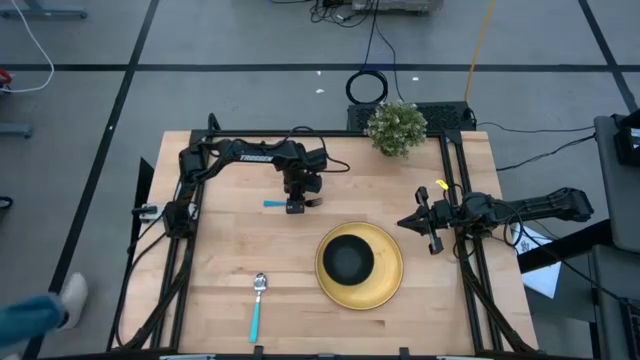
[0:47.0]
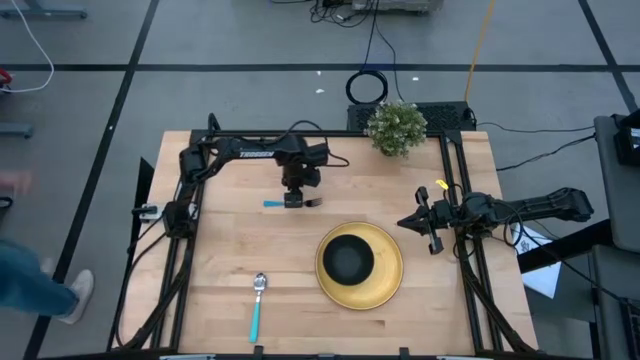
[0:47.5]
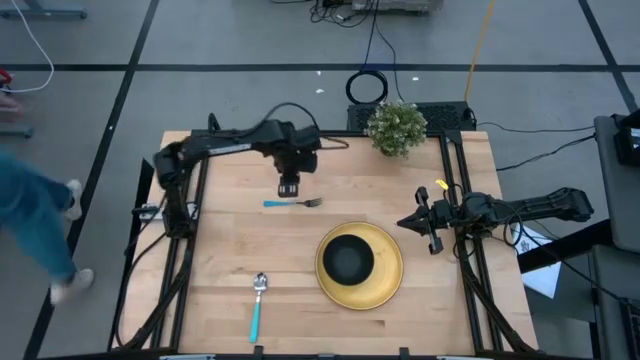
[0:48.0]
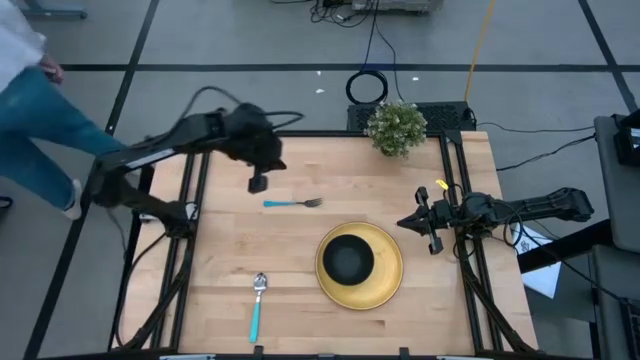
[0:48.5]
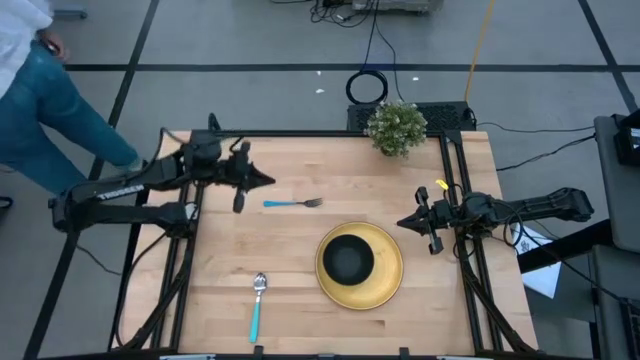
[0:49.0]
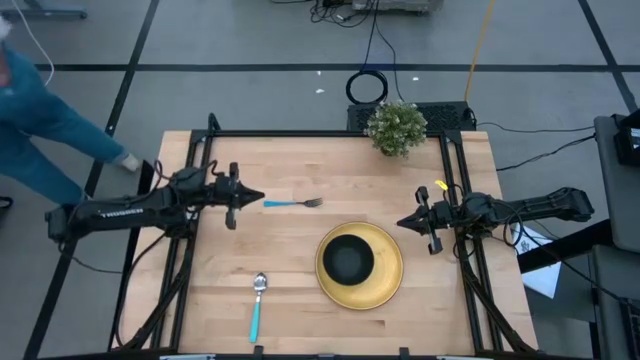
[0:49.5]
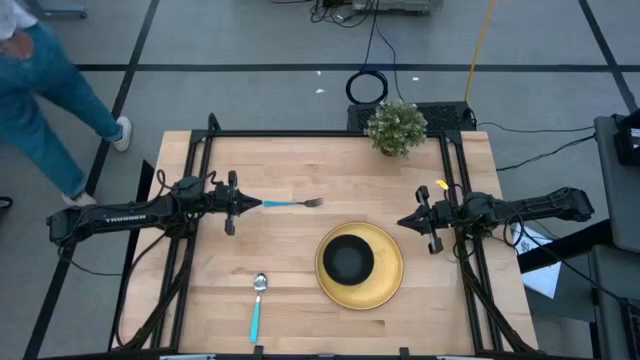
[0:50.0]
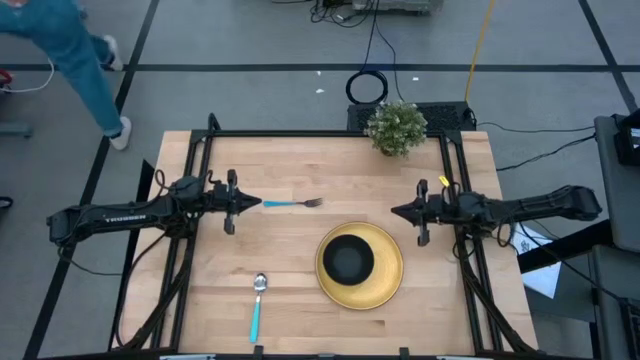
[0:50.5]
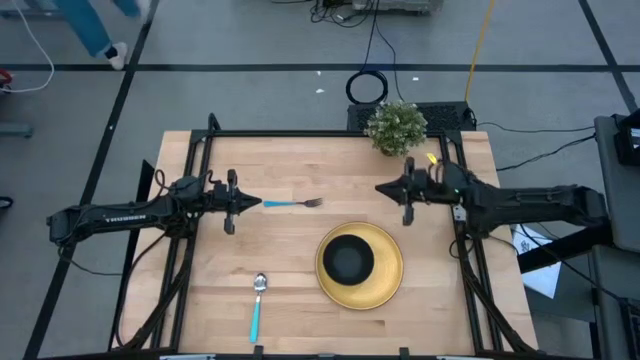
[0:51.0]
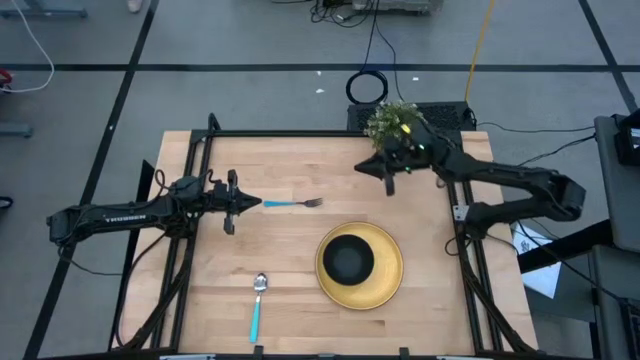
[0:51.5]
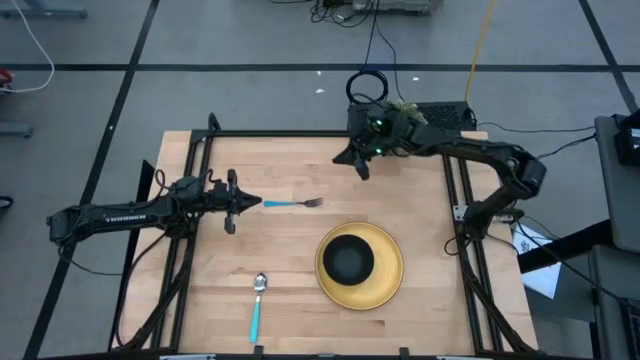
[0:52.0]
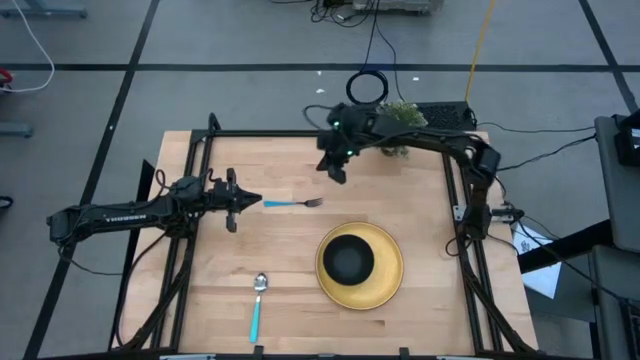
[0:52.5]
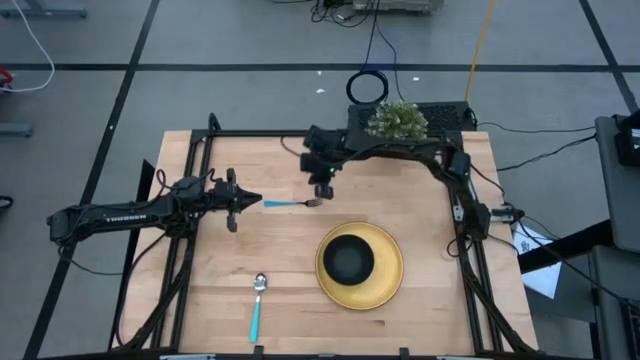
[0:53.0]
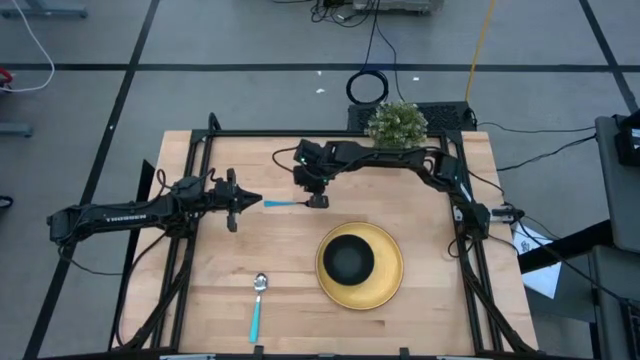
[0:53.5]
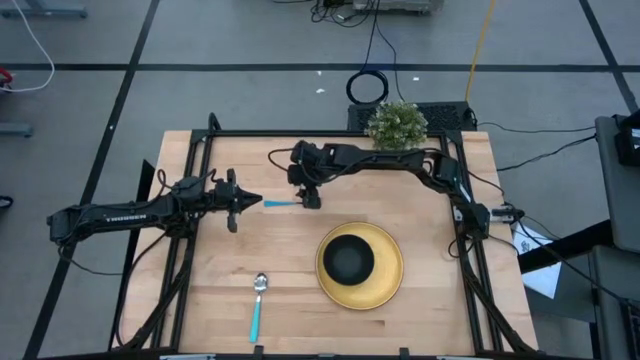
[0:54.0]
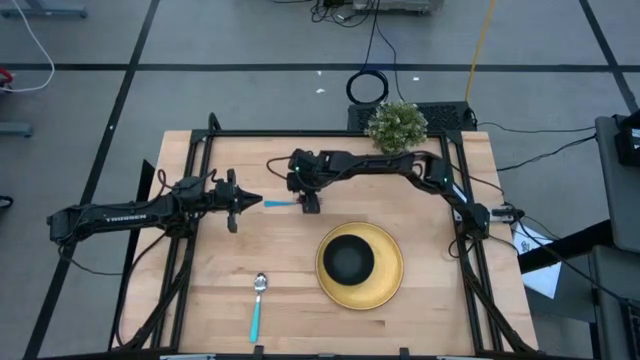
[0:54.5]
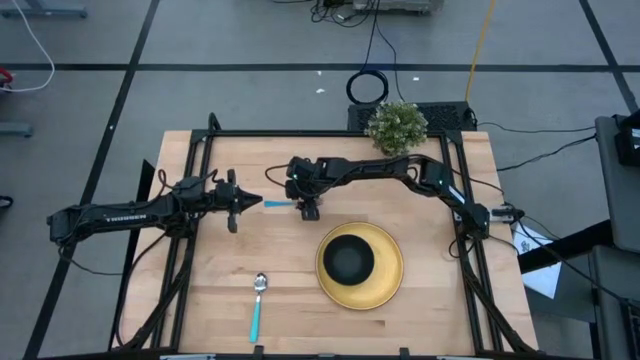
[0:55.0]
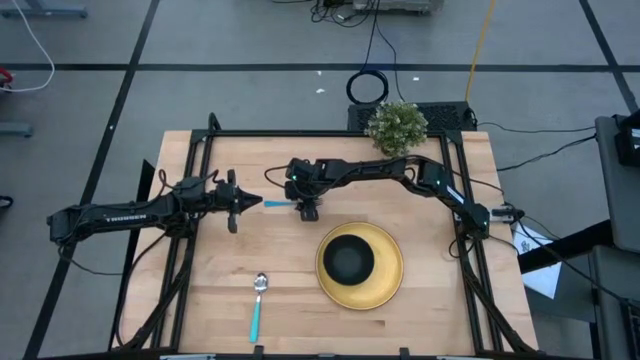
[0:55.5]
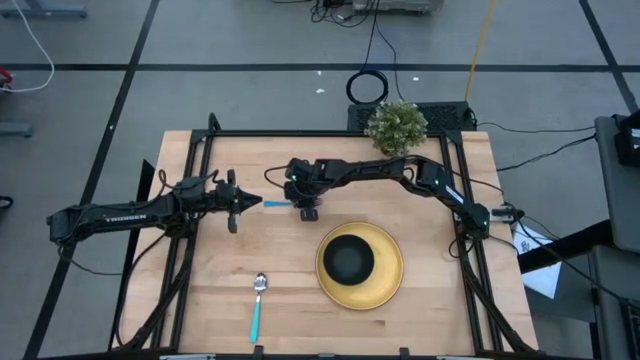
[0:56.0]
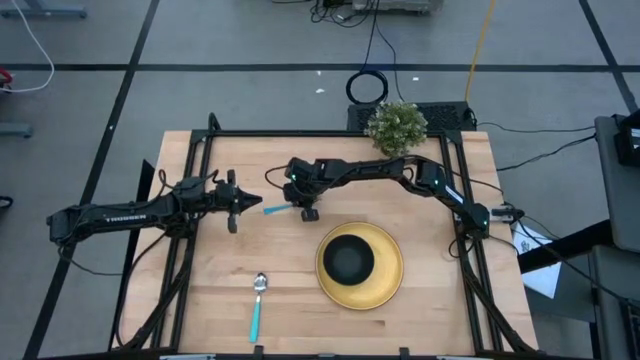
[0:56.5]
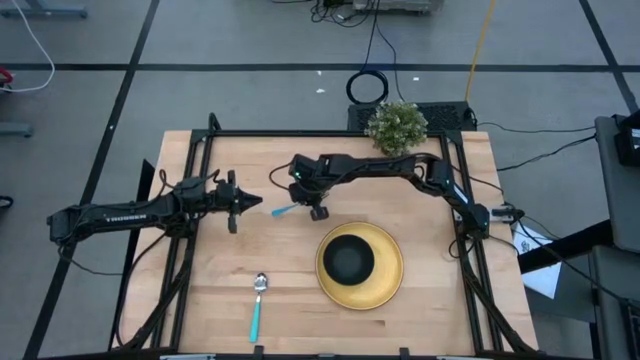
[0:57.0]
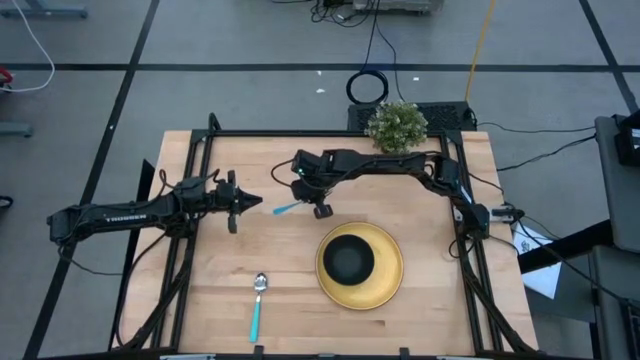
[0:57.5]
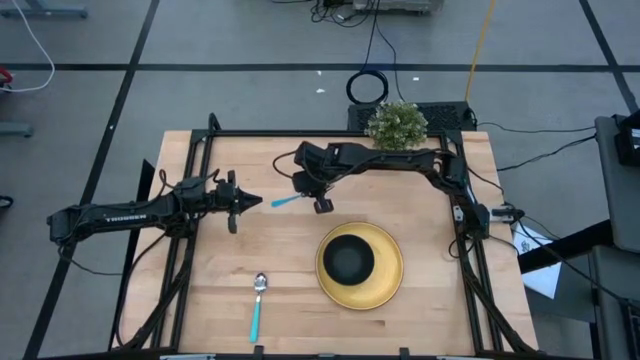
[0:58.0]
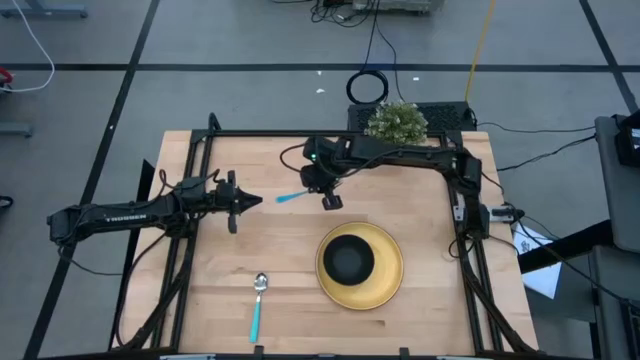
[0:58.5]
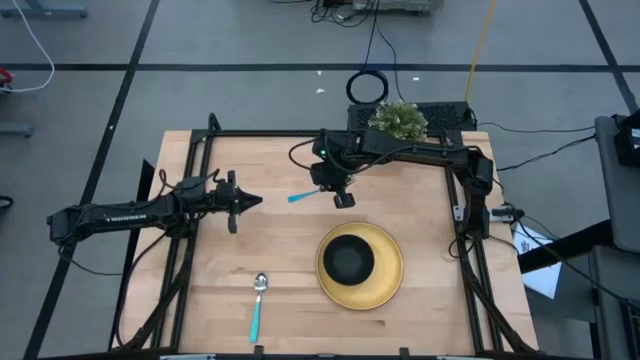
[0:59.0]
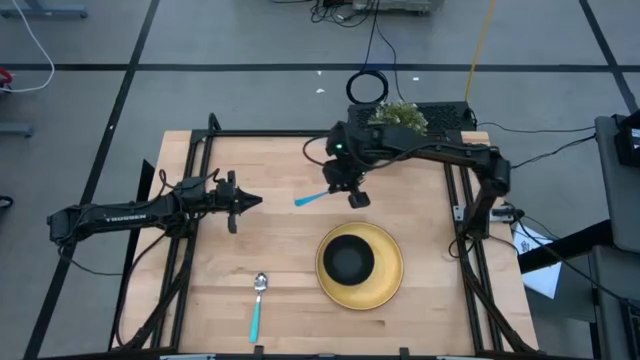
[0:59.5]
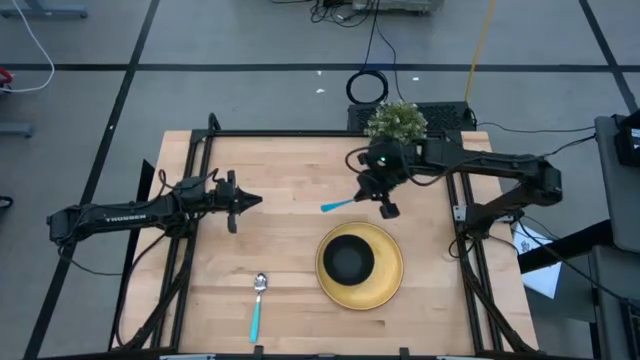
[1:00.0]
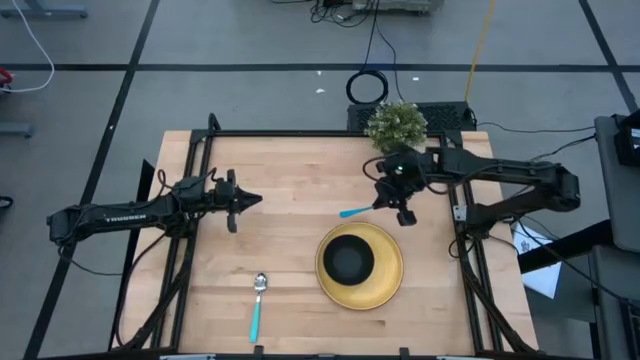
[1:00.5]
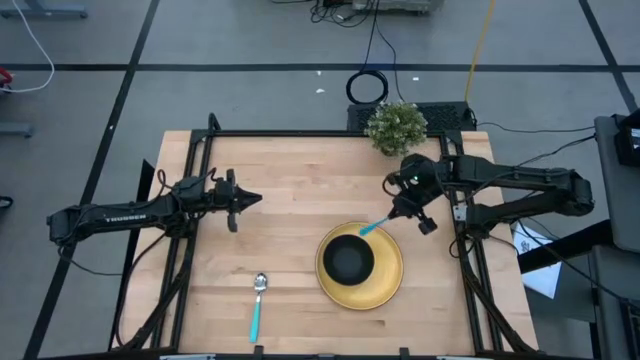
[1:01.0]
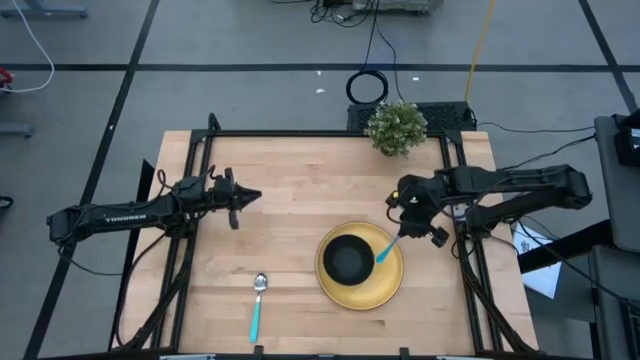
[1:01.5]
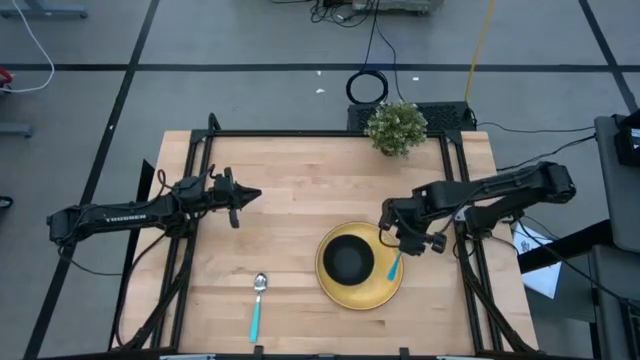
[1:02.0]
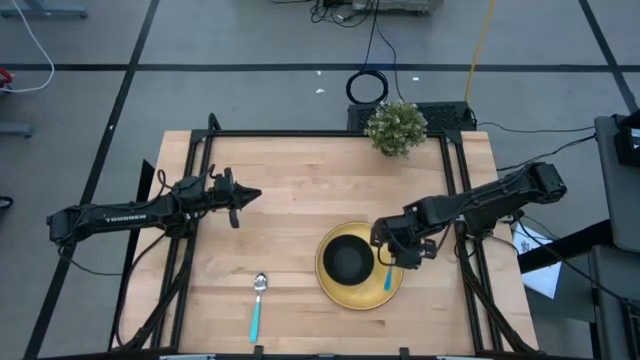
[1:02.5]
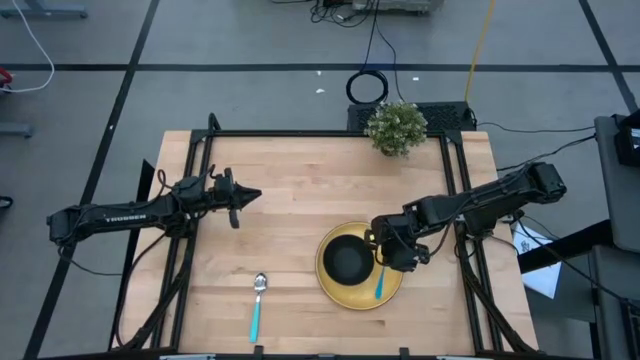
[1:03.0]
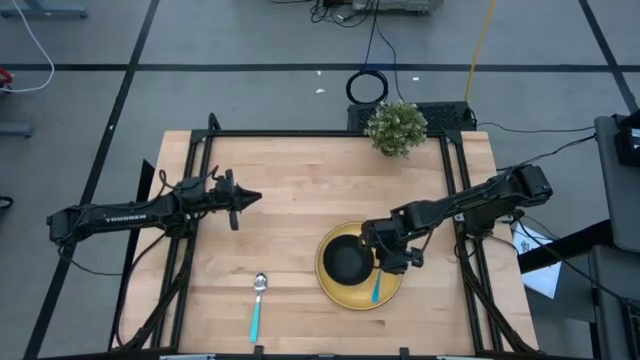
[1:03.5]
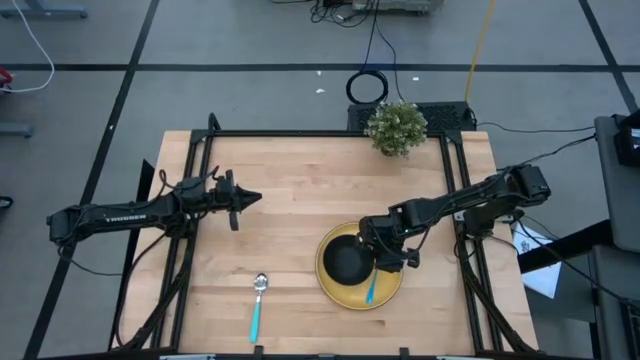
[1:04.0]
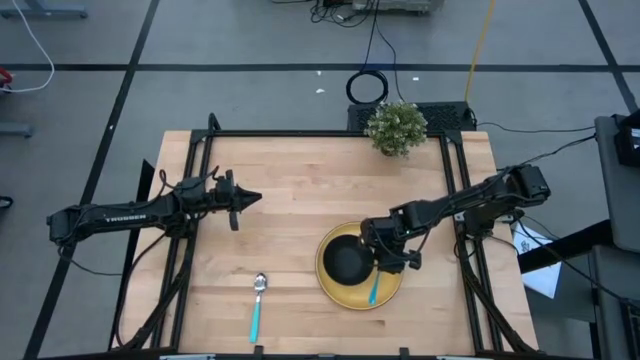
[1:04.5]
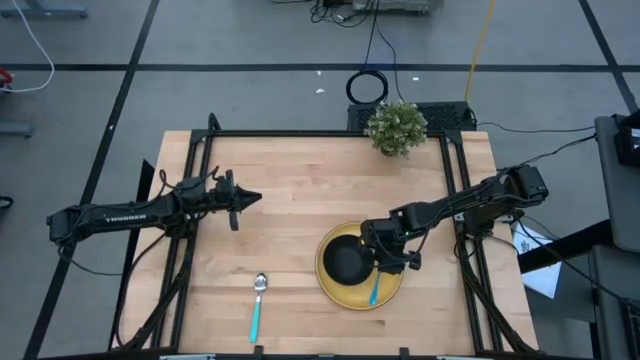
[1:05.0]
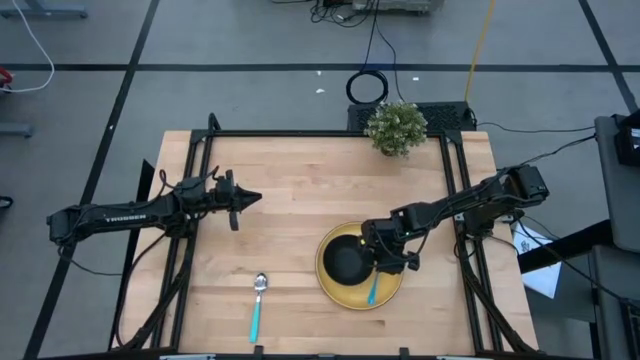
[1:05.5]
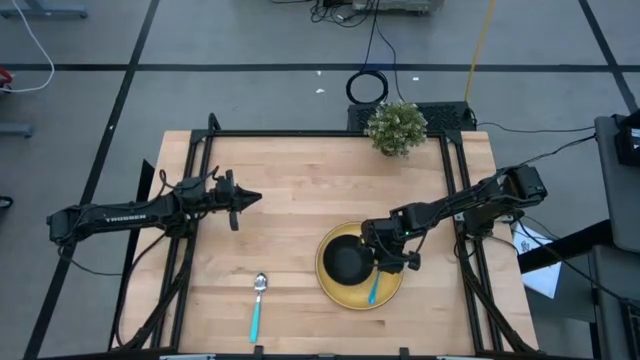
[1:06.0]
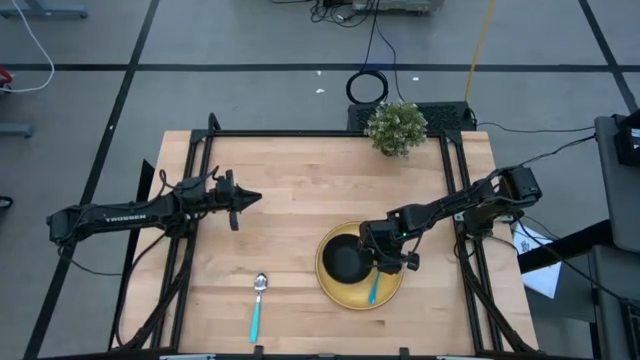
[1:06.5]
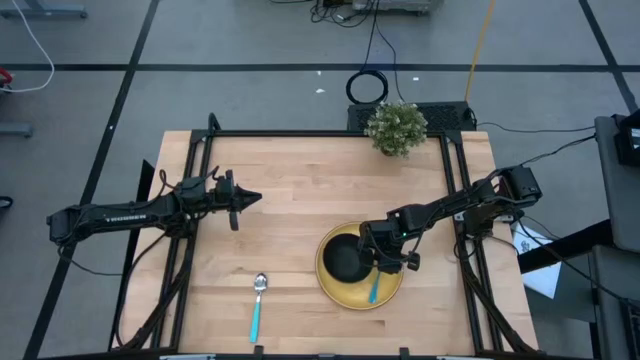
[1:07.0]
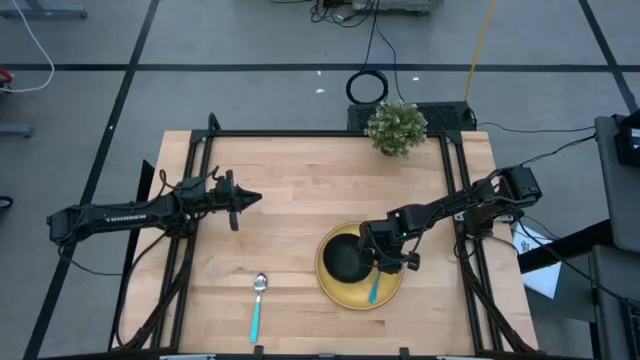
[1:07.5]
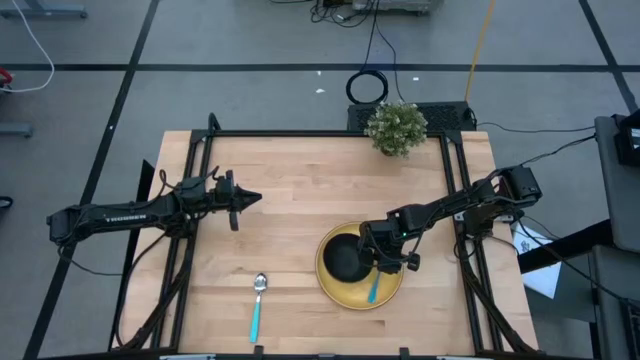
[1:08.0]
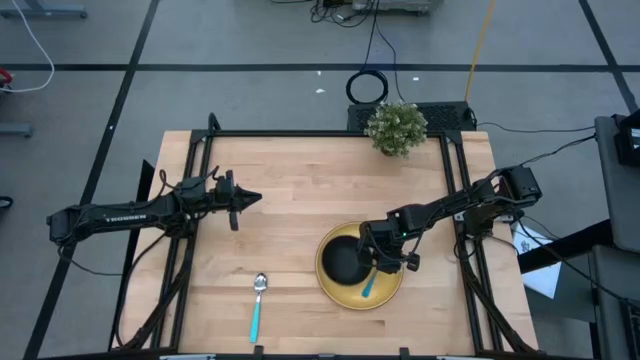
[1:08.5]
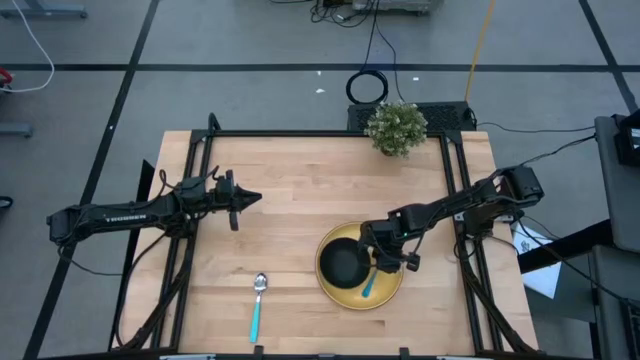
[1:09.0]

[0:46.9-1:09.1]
Task: Set table place
Put the blue fork on the yellow plate to the right of the black bowl
